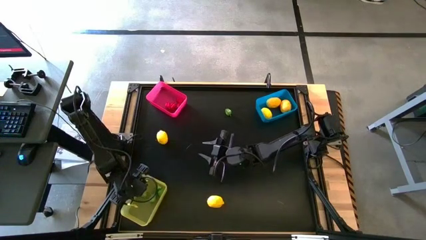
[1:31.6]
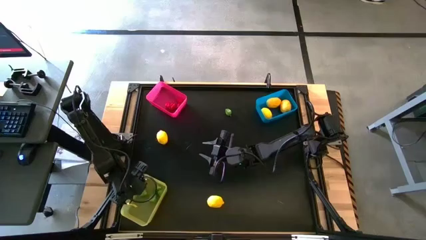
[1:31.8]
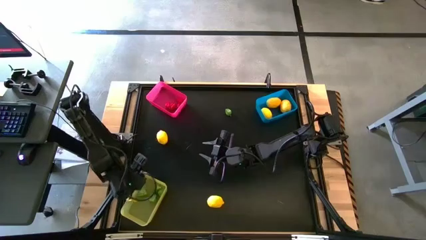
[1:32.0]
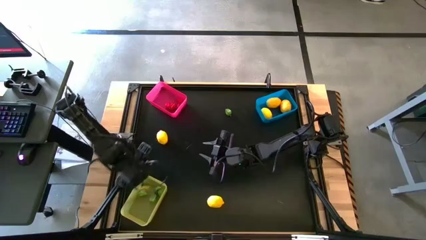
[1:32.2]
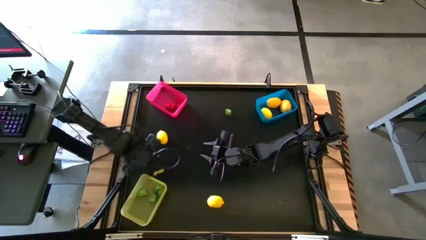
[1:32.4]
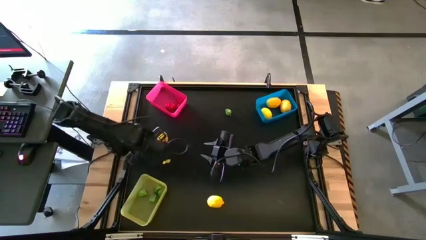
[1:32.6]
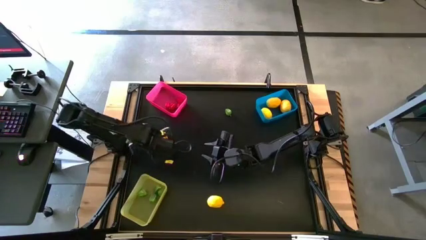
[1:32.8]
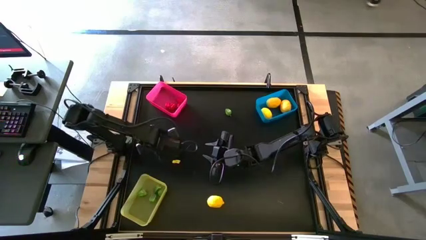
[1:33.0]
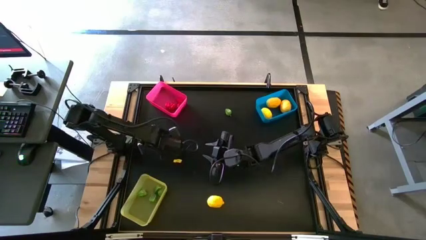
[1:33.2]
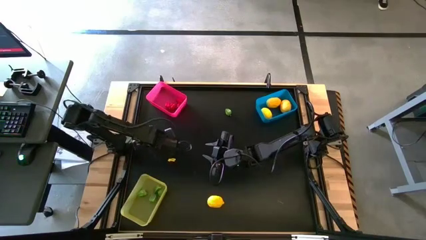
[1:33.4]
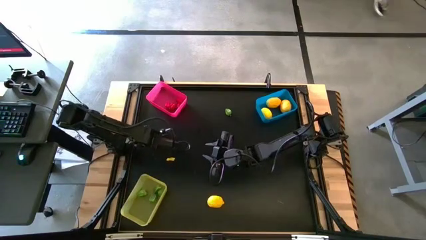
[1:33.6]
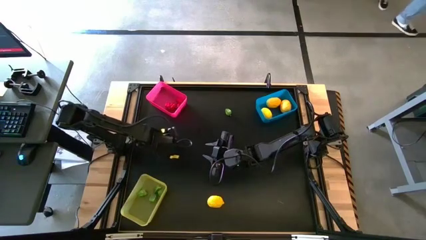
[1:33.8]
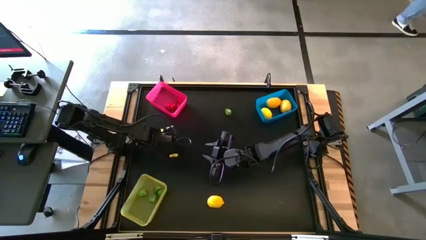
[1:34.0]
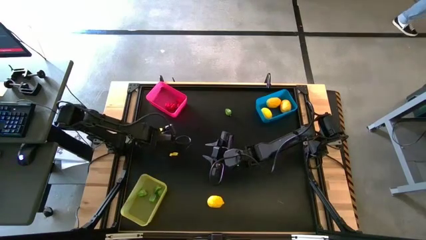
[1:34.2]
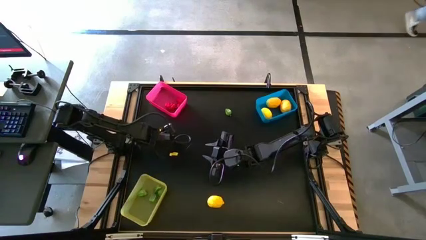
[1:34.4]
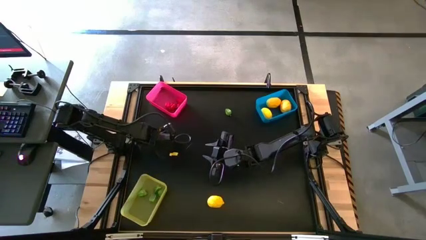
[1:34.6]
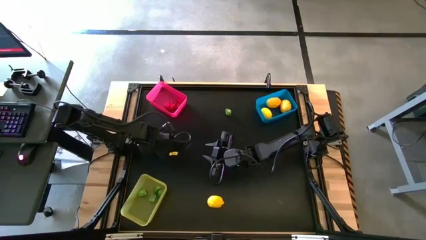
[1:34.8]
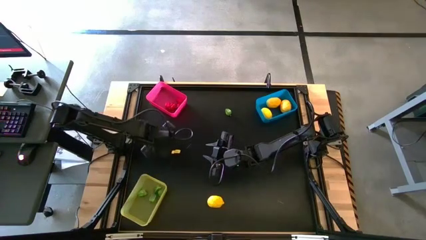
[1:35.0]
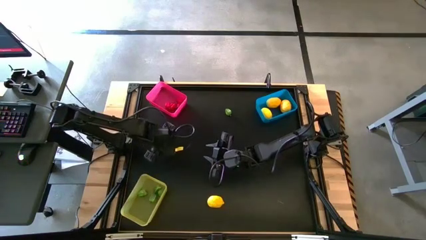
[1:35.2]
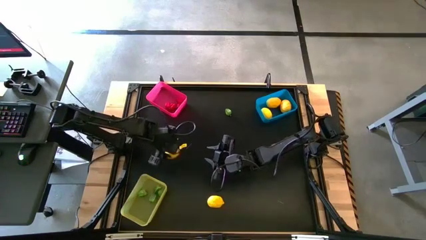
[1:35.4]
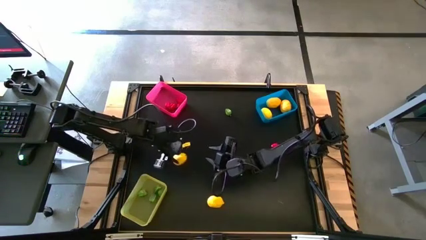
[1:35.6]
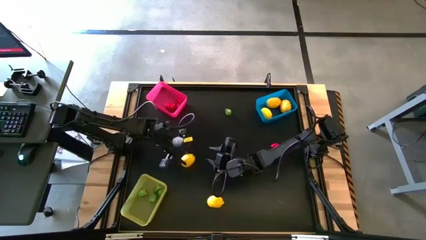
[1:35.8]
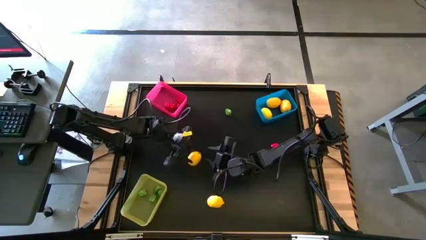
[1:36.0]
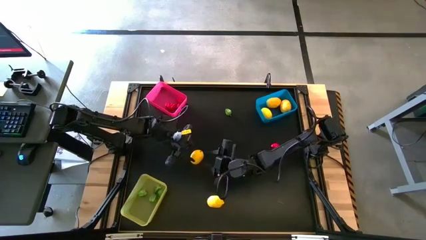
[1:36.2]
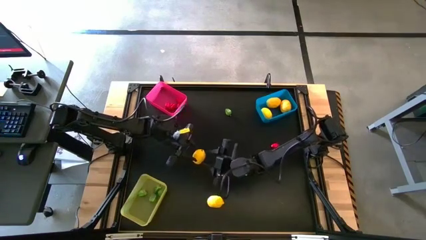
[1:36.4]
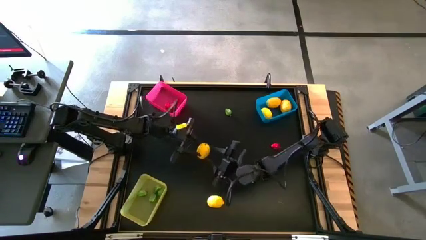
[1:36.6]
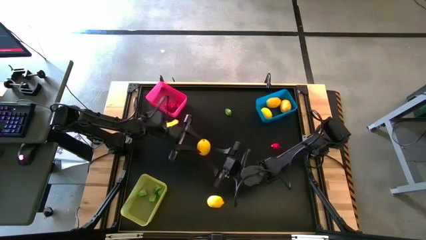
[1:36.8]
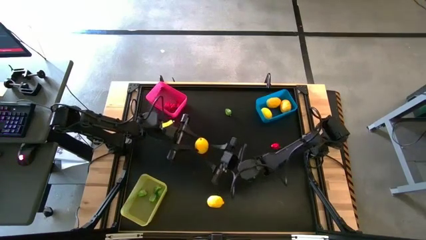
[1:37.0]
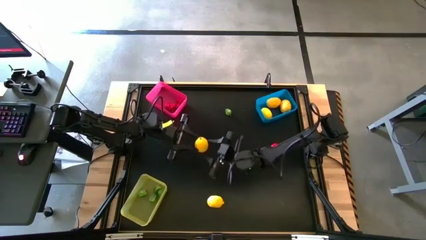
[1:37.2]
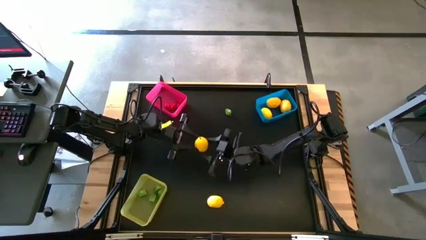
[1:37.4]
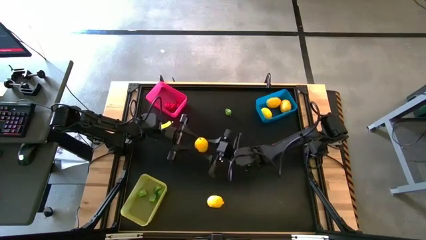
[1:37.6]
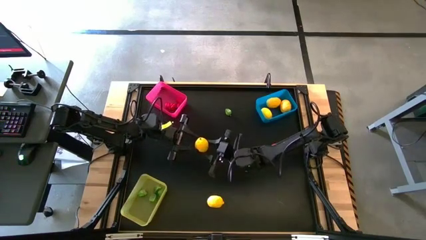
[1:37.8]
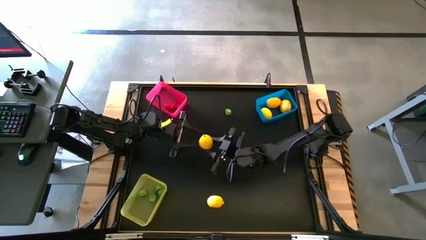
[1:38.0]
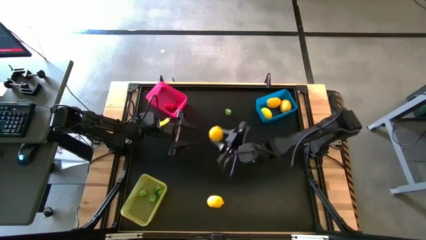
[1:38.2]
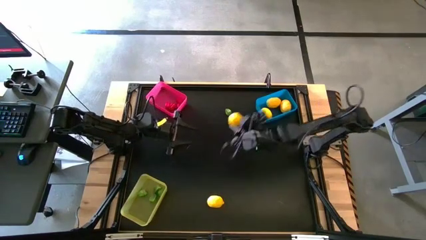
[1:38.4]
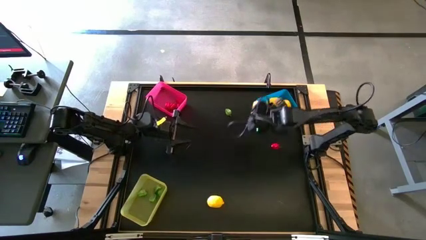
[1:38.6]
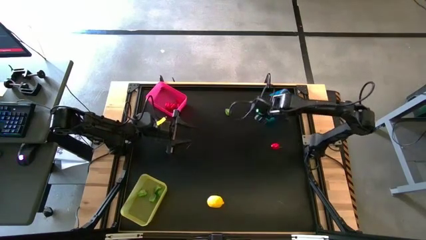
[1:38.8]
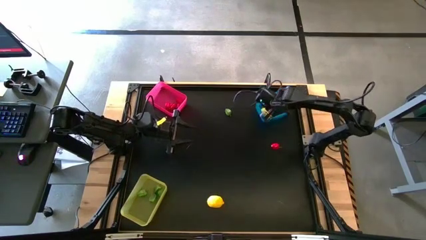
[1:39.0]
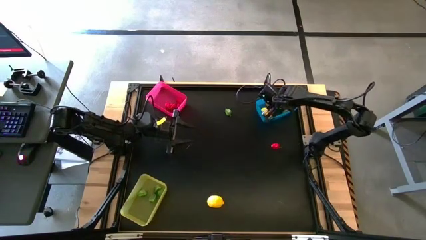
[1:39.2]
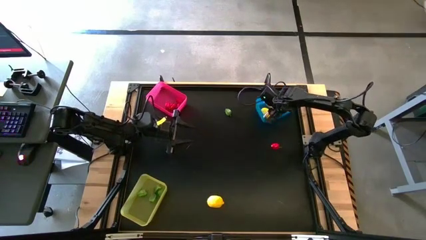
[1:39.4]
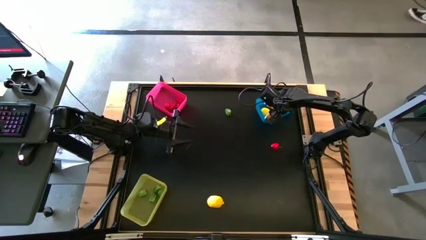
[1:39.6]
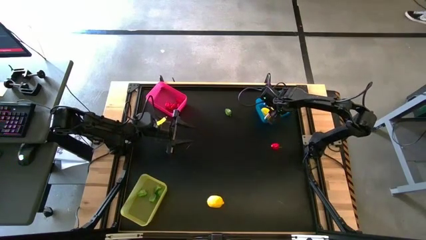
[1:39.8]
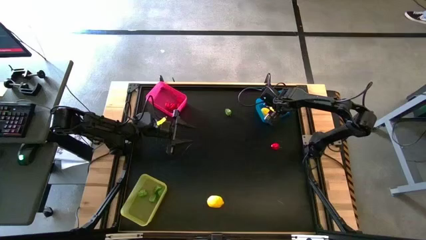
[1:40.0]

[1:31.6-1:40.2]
Task: Sort produce into baskets
Put the yellow lemon into the blue bin

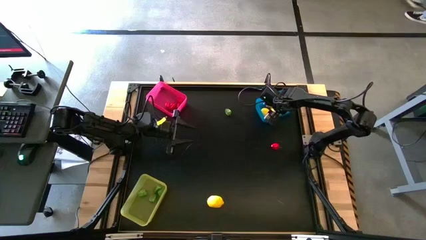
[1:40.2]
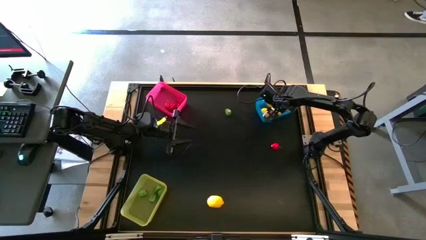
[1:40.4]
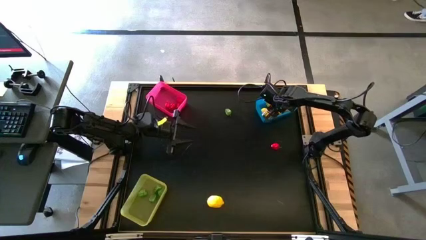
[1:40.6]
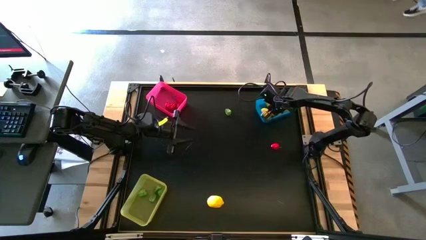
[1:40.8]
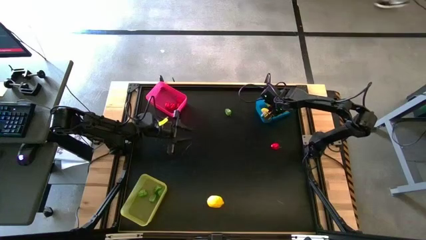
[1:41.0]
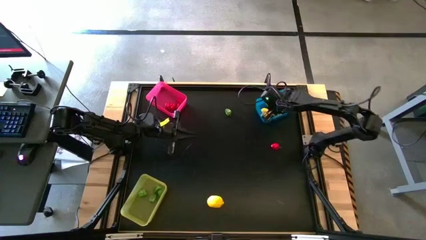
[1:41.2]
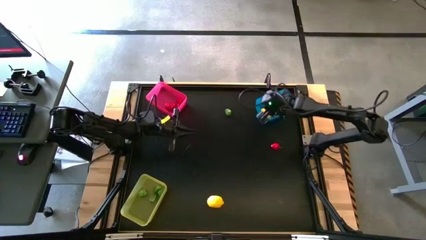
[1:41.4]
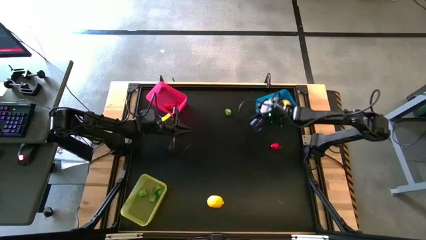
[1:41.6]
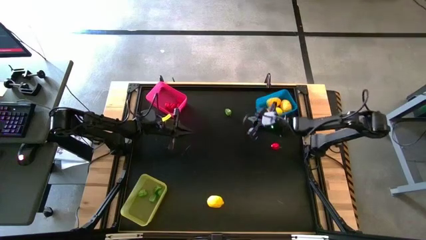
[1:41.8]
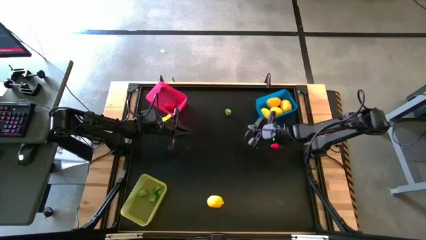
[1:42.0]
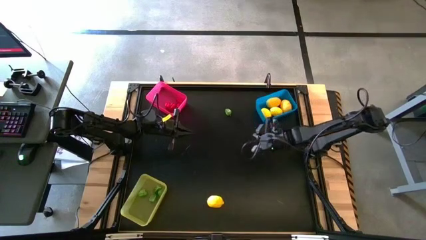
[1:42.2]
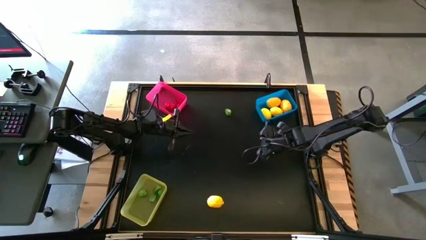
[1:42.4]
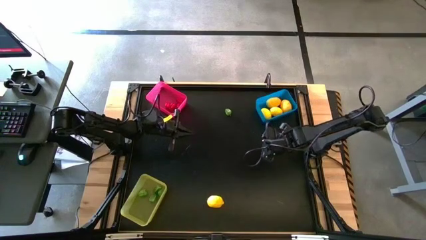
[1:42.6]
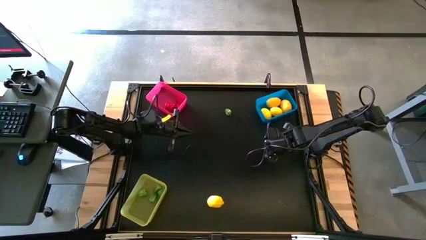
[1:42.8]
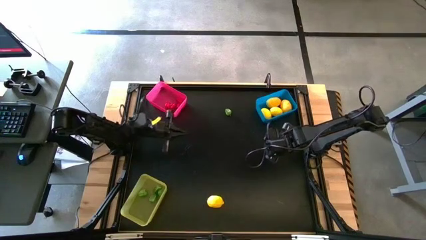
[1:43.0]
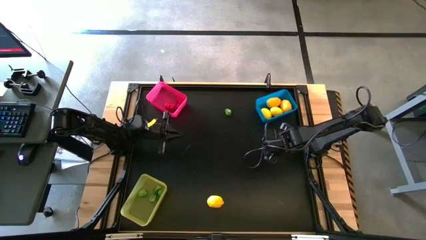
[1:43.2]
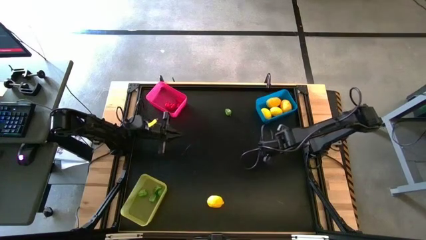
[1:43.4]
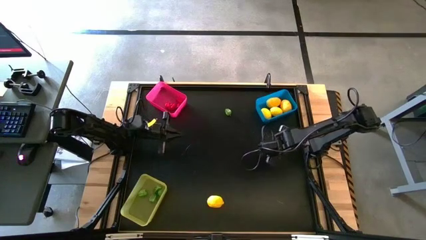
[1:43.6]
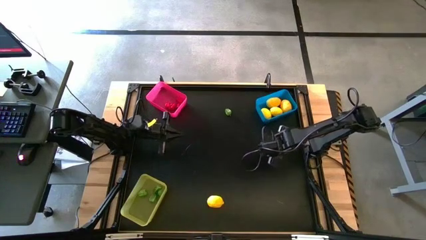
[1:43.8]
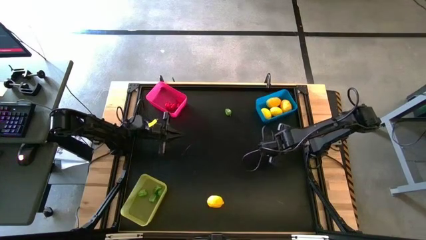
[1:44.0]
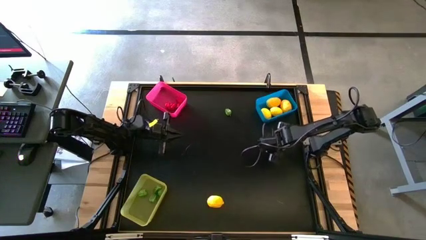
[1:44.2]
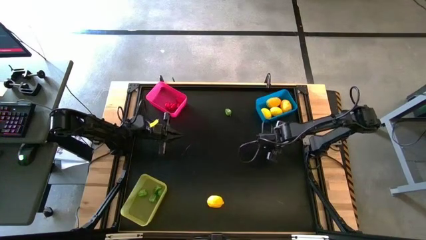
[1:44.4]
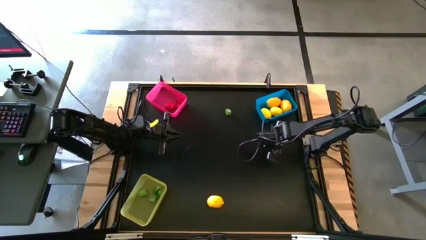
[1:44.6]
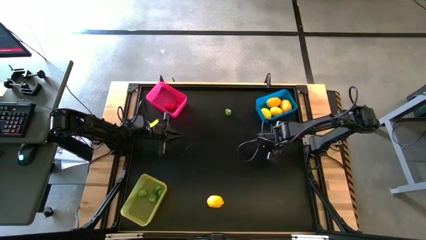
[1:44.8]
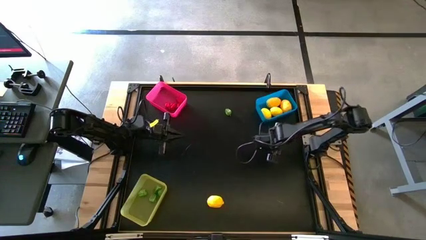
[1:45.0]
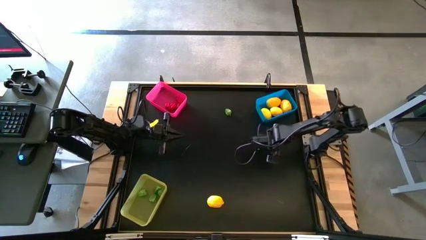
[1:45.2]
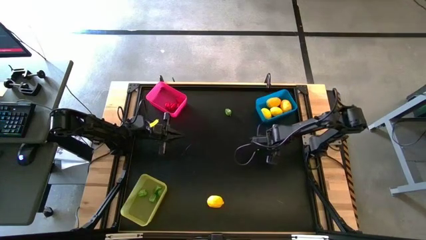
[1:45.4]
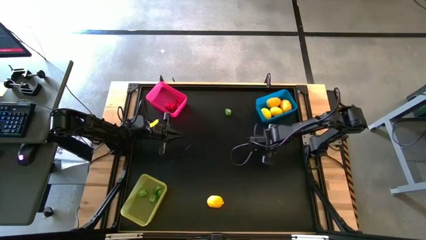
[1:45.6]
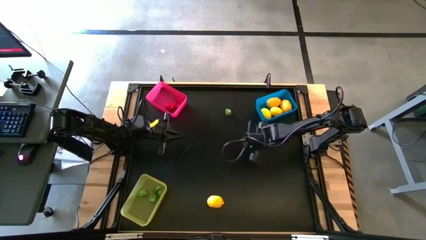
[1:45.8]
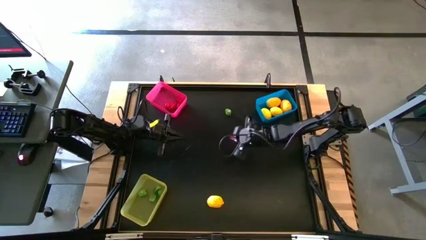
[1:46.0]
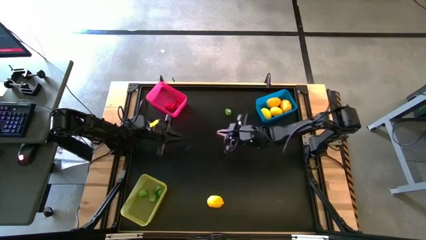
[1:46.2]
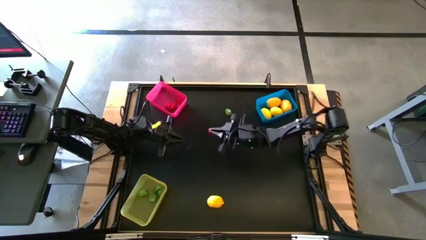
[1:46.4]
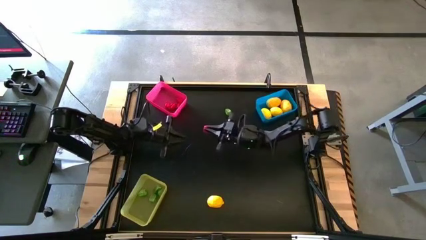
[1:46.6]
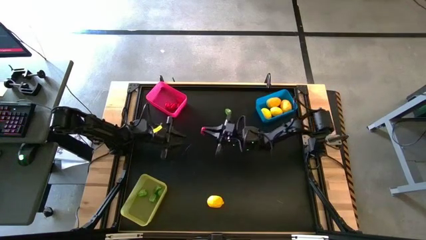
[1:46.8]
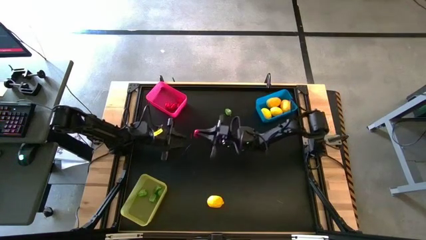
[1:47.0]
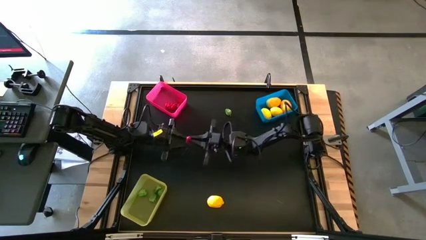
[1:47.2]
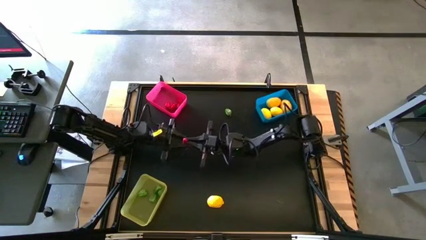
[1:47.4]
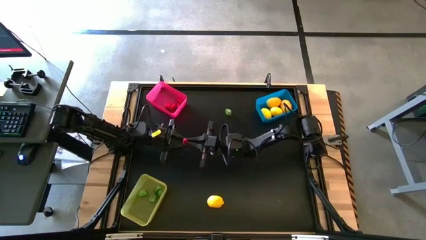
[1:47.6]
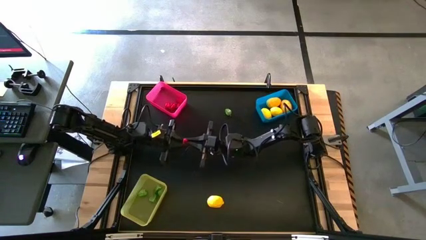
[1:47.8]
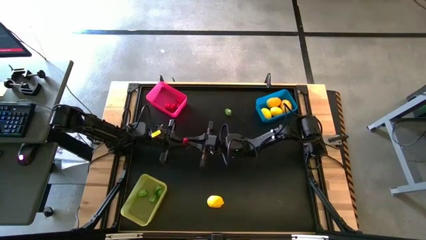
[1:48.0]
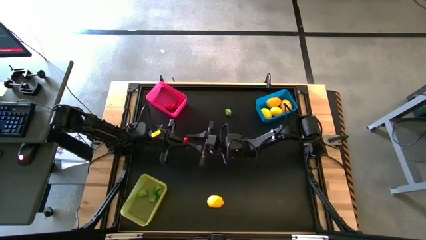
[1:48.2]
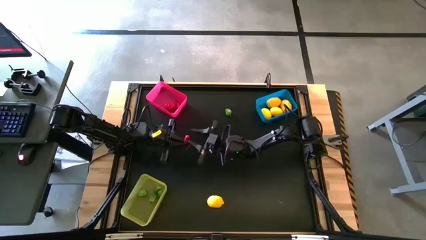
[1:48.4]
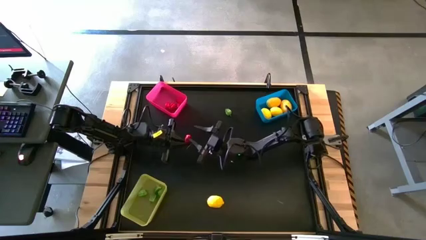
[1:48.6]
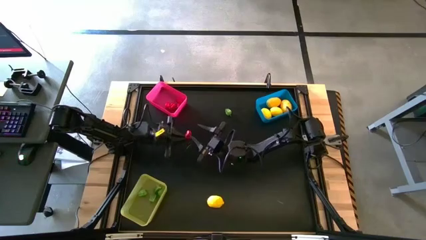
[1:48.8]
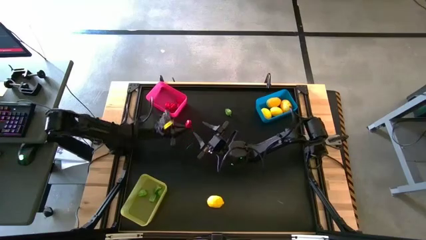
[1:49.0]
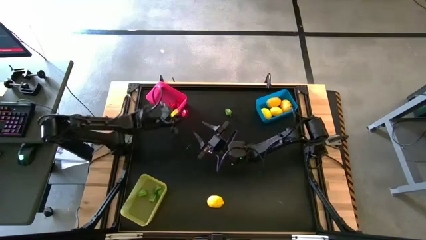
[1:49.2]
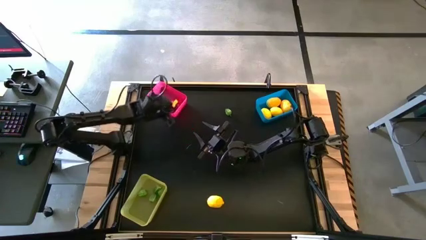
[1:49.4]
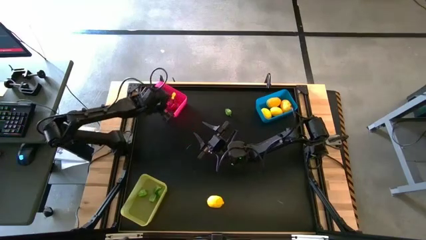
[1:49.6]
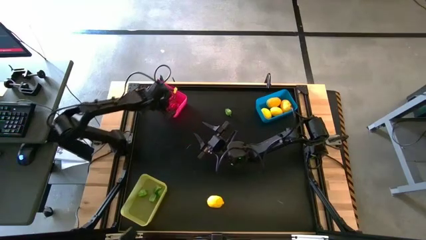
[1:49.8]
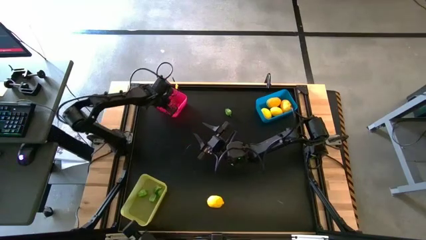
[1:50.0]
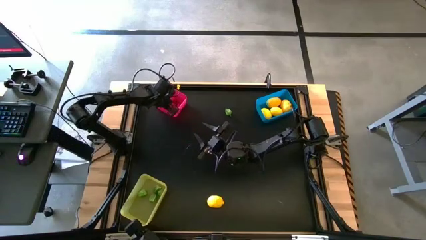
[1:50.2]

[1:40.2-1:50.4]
Put the red bell pepper into the red bin
